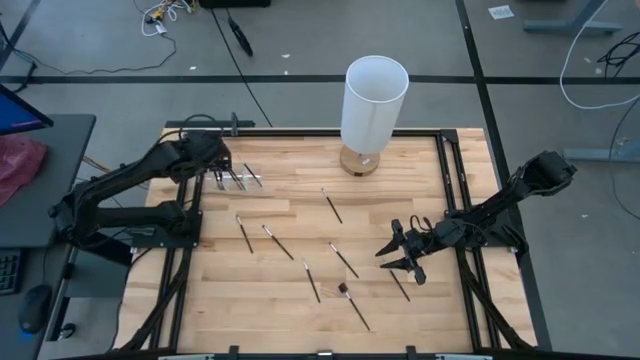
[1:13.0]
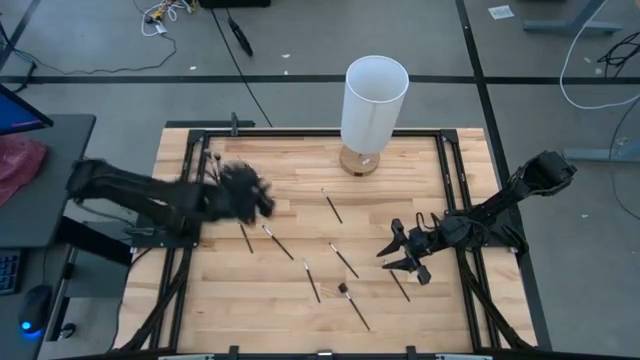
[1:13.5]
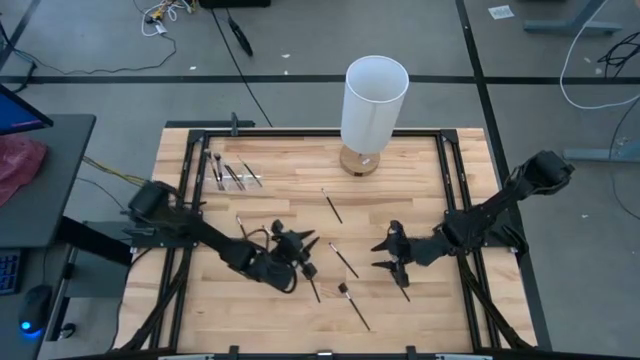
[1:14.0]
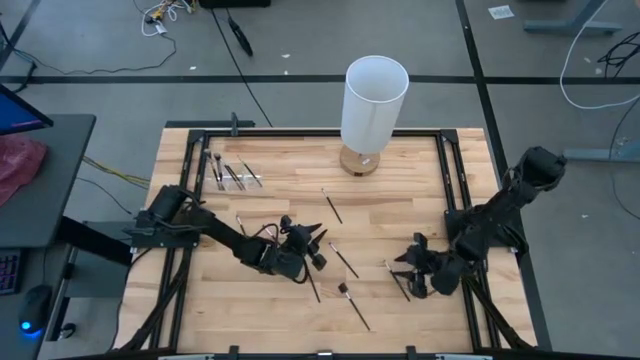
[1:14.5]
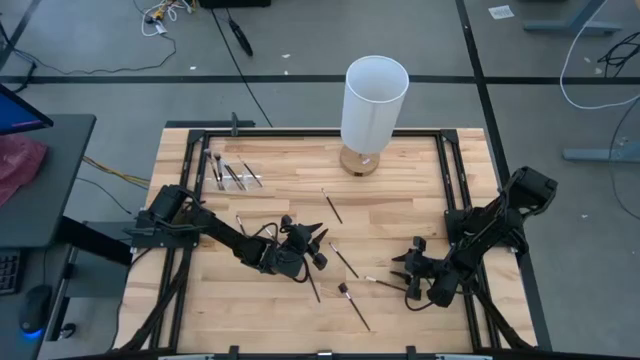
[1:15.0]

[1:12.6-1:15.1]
Task: Put items in baskets/containers
Put the black eyeshadow brush into the transparent organizer

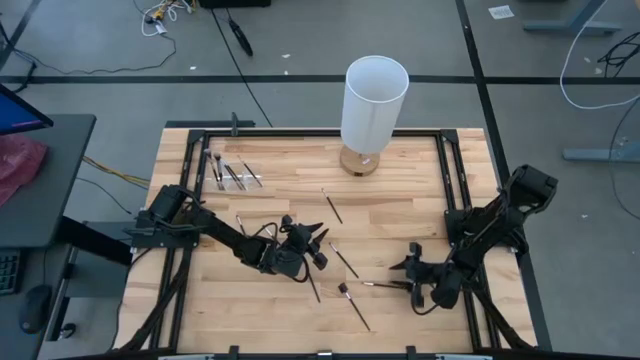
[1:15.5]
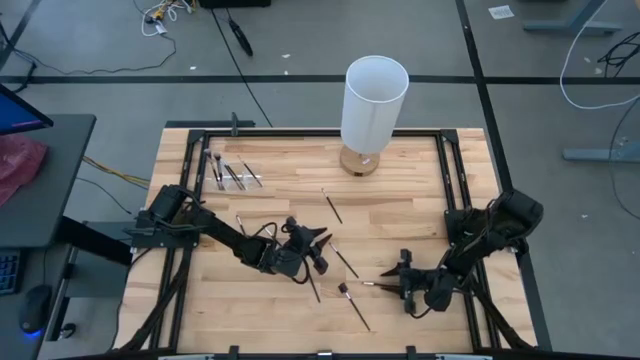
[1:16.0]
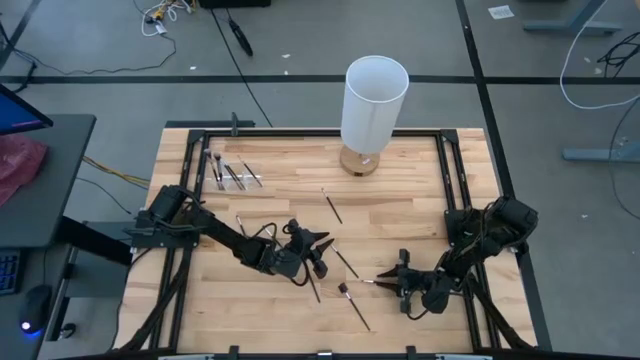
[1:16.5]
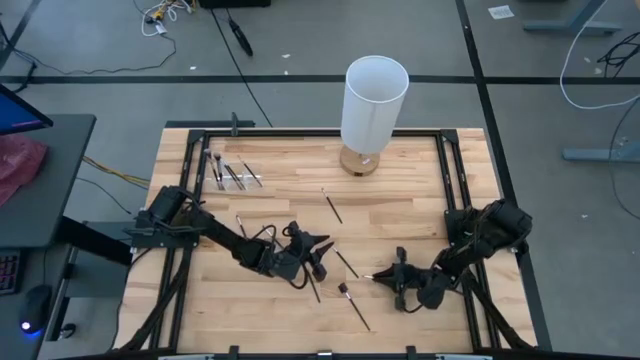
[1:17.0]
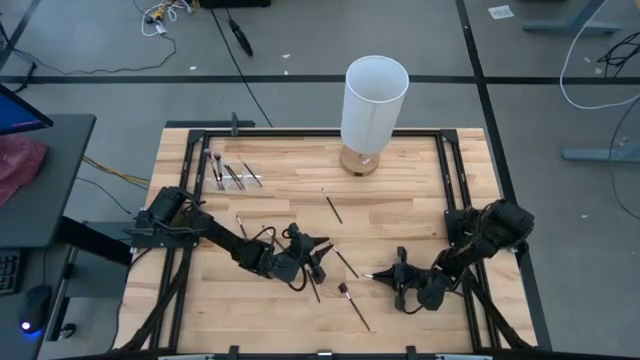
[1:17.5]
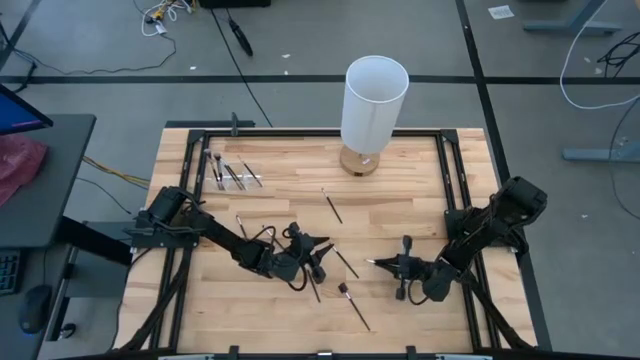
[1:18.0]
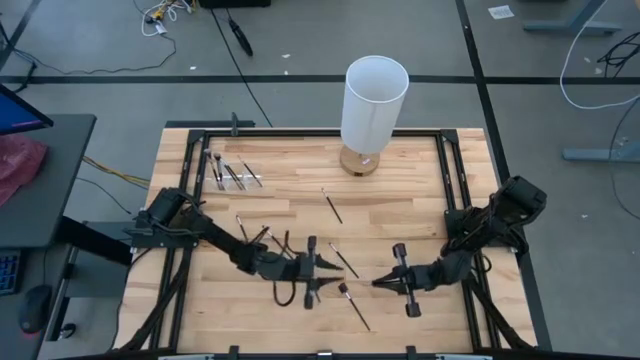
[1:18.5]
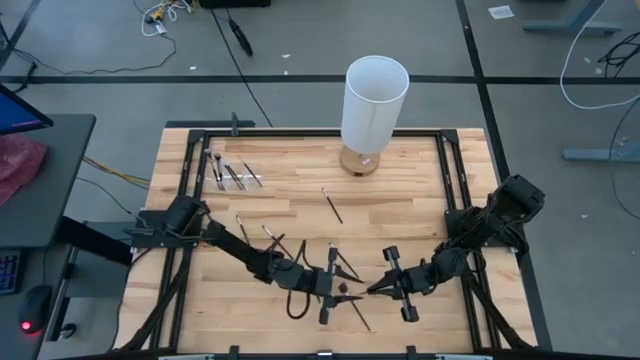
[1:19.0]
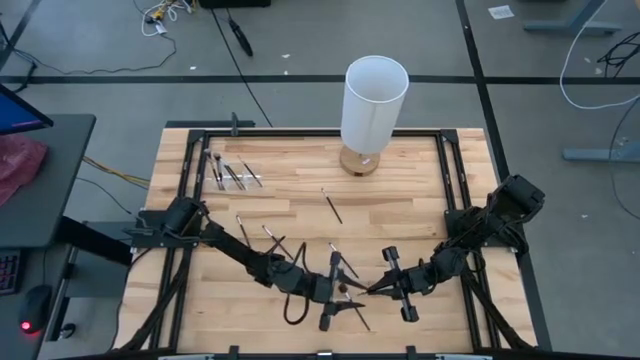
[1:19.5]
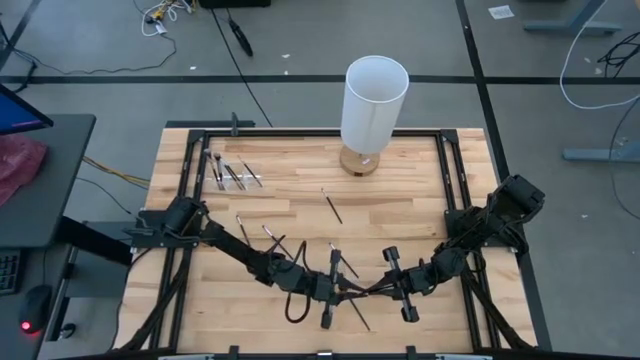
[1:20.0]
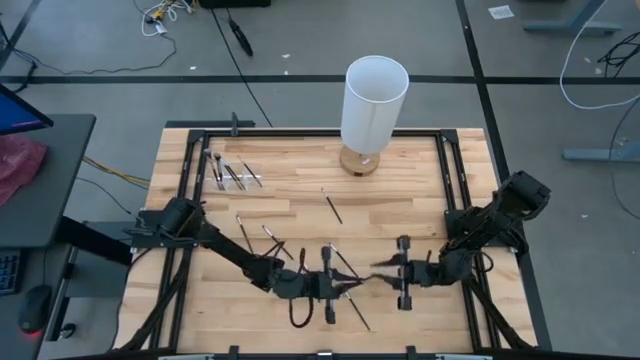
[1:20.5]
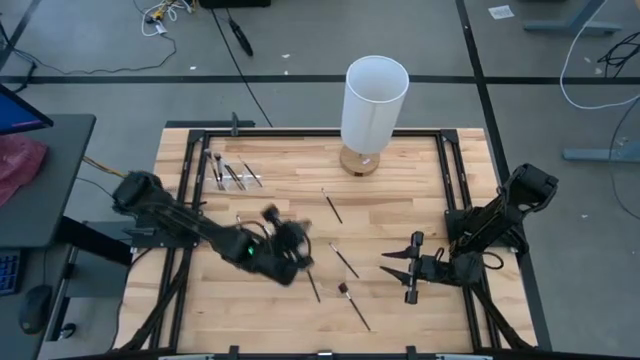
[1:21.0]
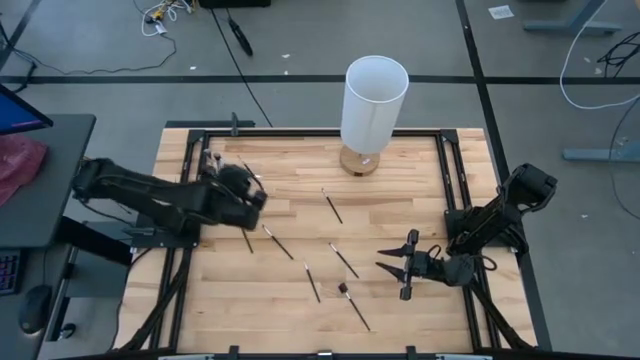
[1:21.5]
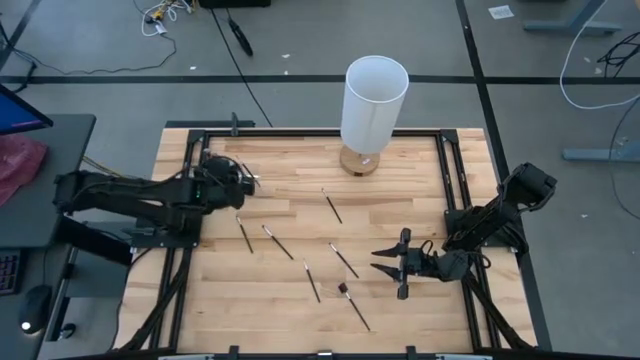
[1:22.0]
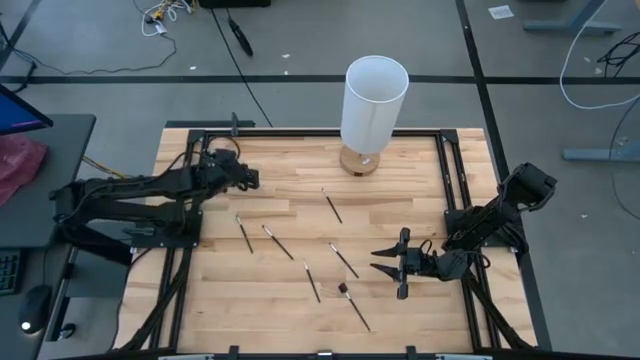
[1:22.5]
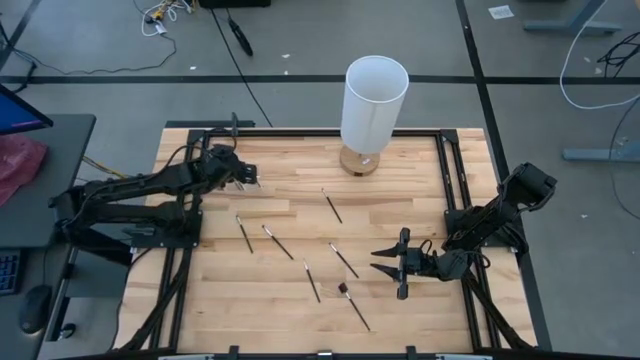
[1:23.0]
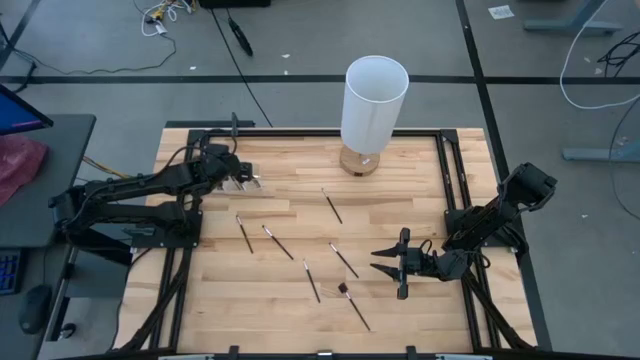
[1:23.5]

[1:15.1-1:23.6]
Put the black eyeshadow brush into the transparent organizer

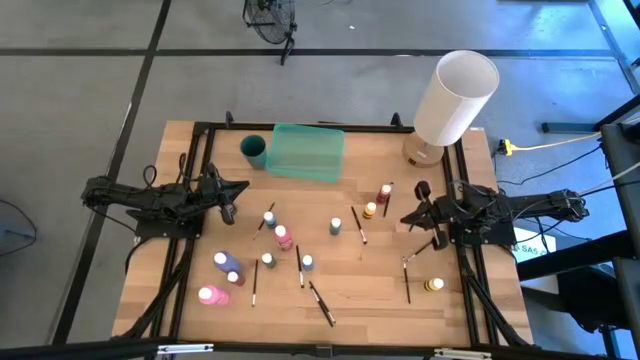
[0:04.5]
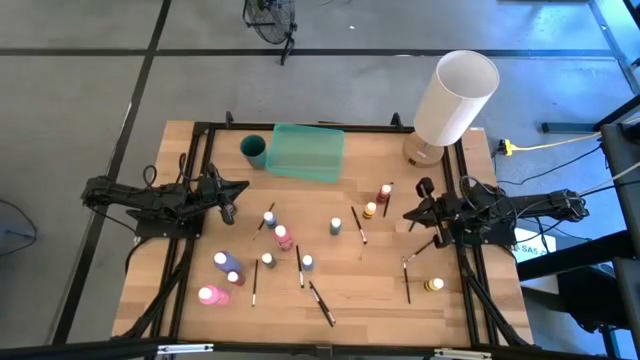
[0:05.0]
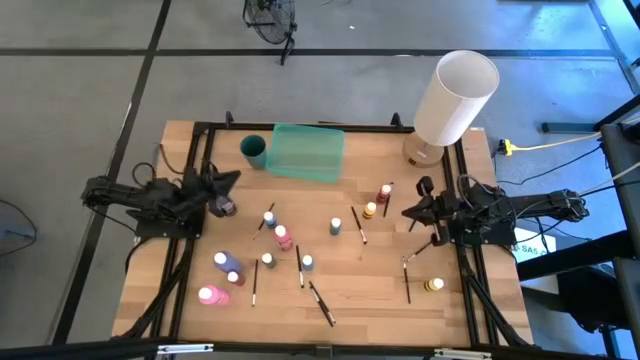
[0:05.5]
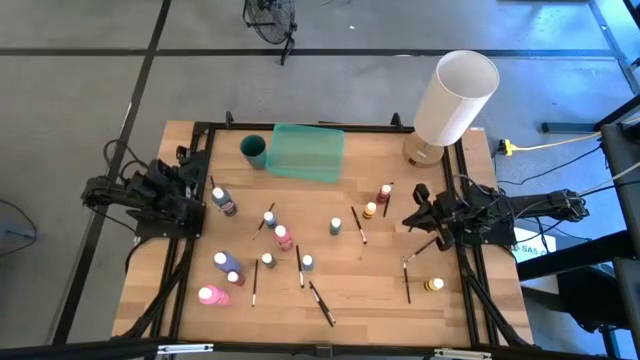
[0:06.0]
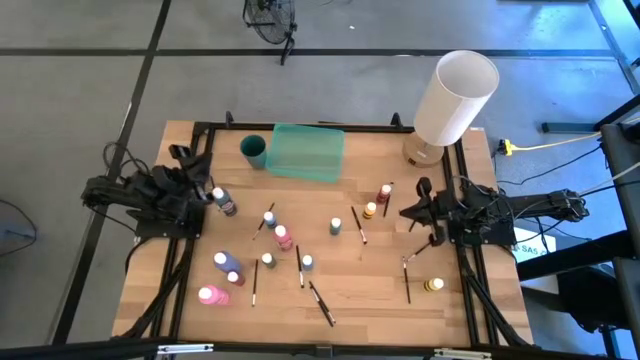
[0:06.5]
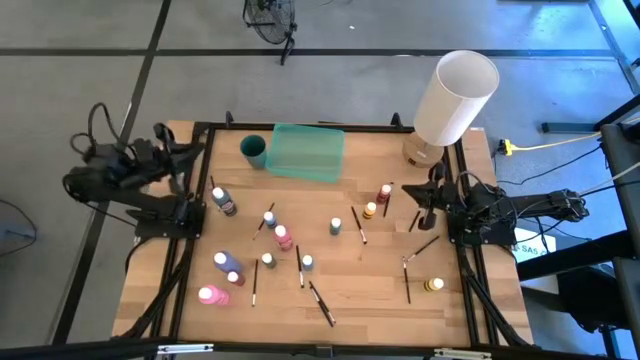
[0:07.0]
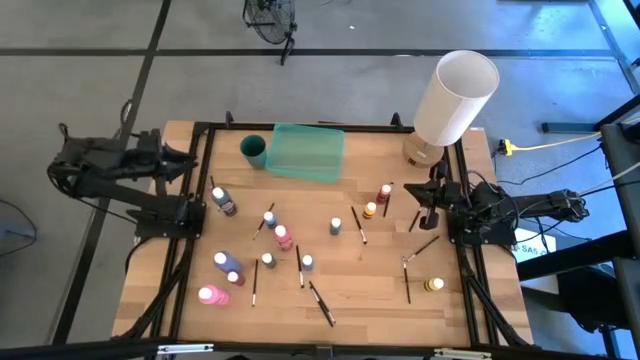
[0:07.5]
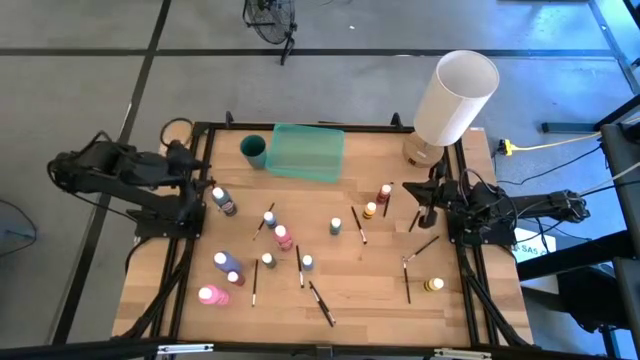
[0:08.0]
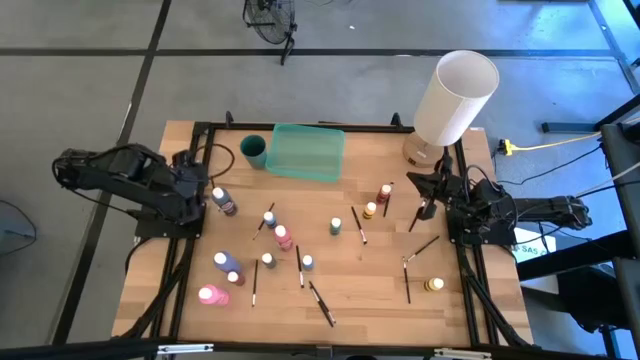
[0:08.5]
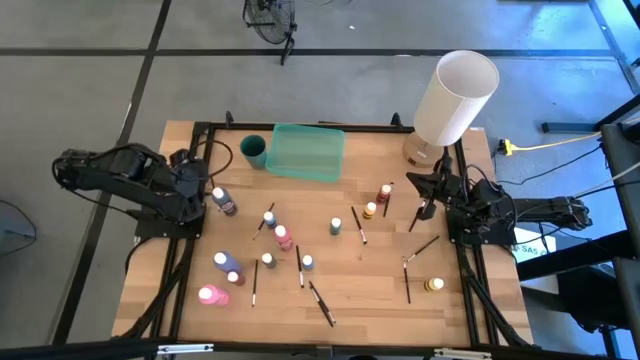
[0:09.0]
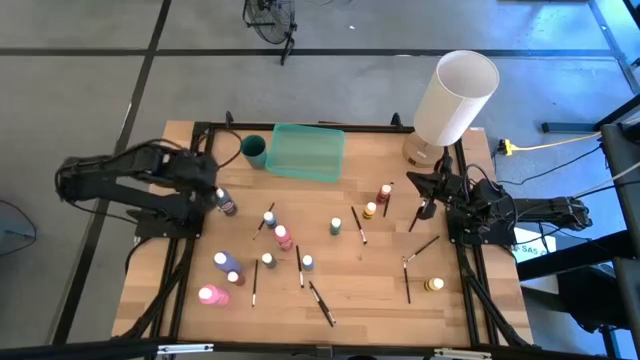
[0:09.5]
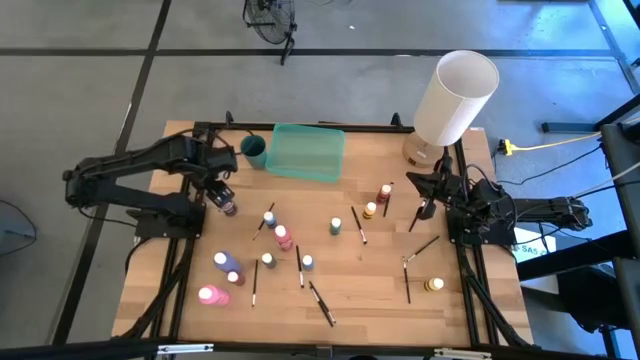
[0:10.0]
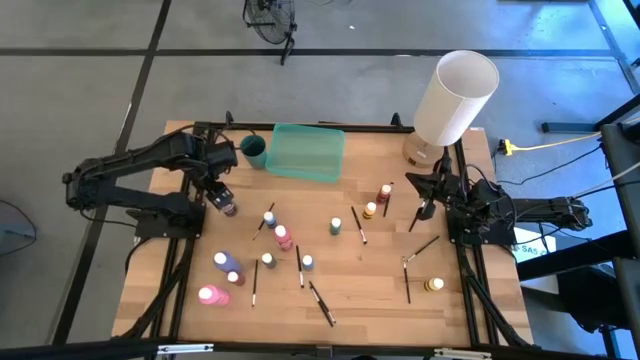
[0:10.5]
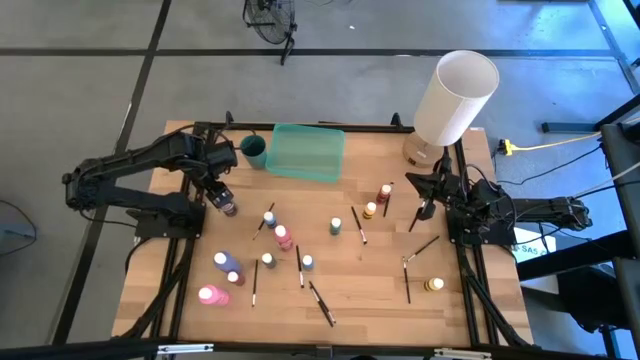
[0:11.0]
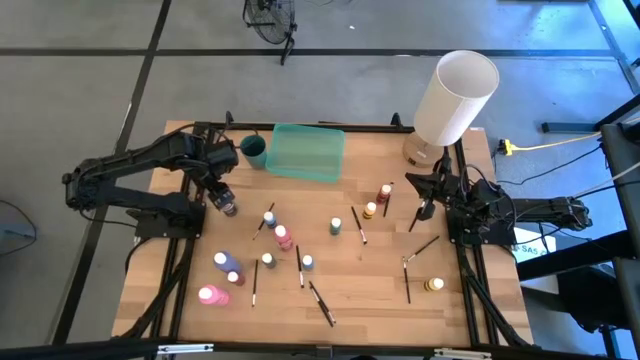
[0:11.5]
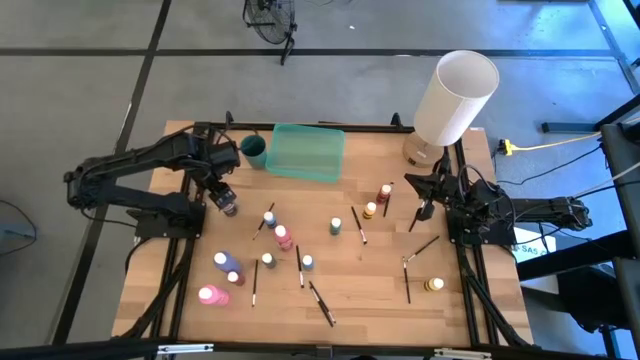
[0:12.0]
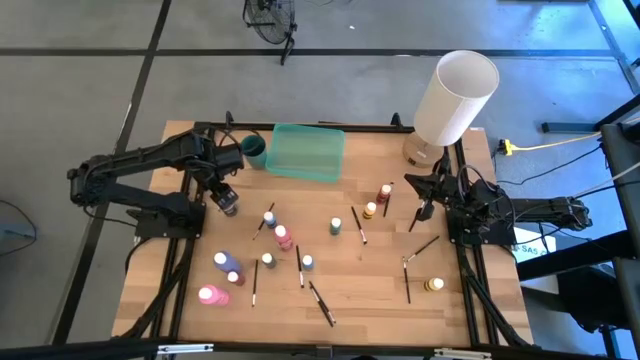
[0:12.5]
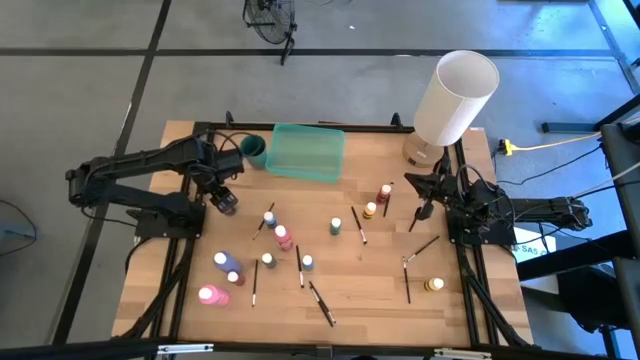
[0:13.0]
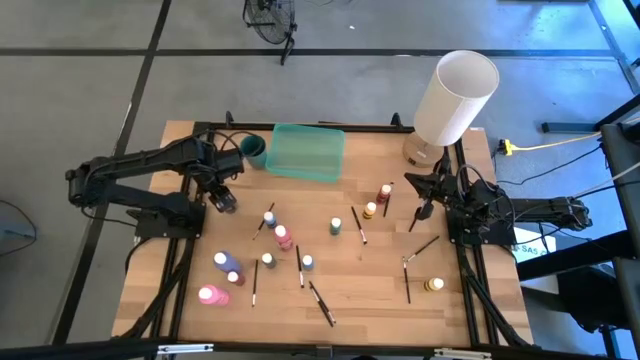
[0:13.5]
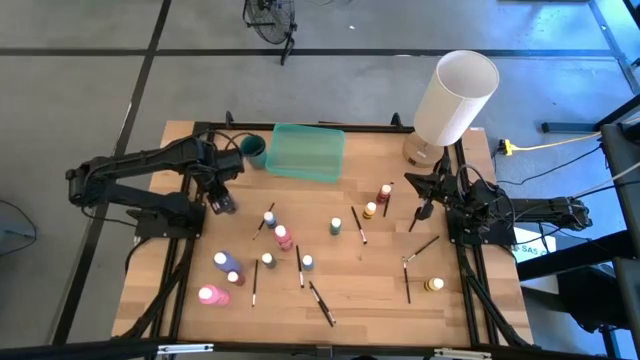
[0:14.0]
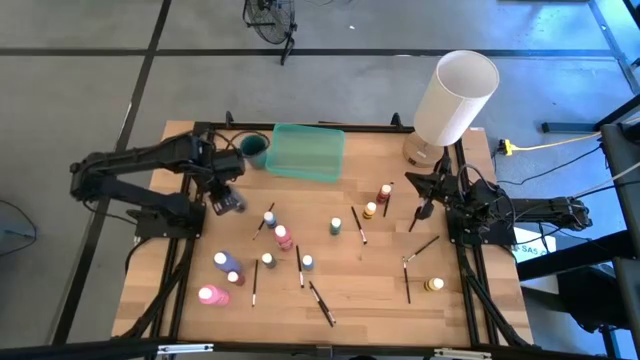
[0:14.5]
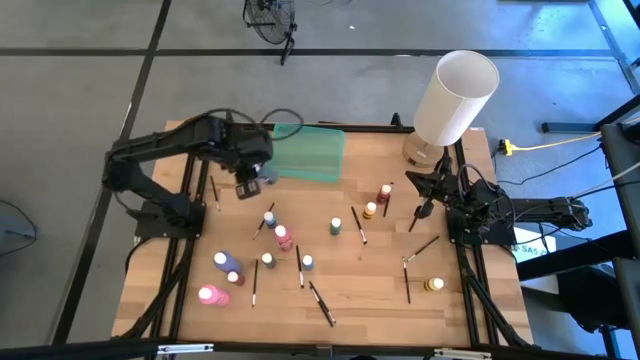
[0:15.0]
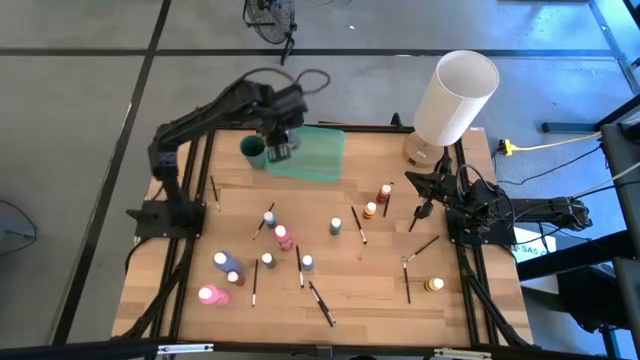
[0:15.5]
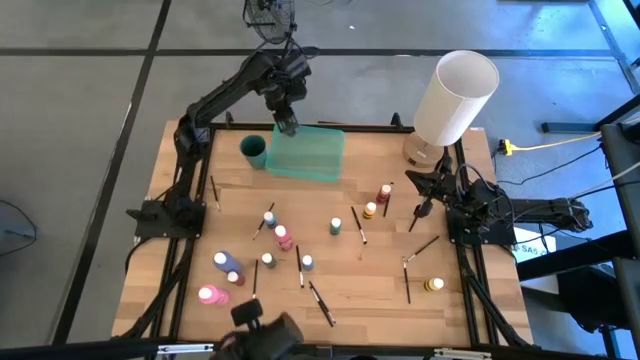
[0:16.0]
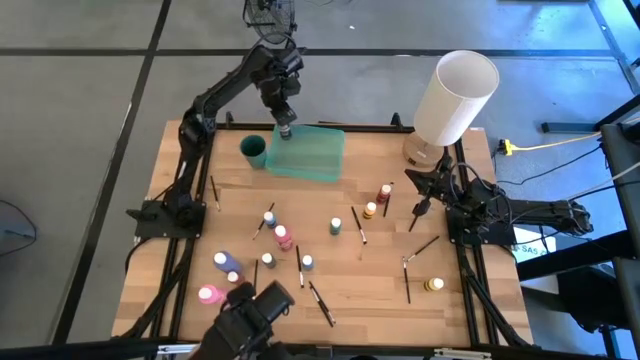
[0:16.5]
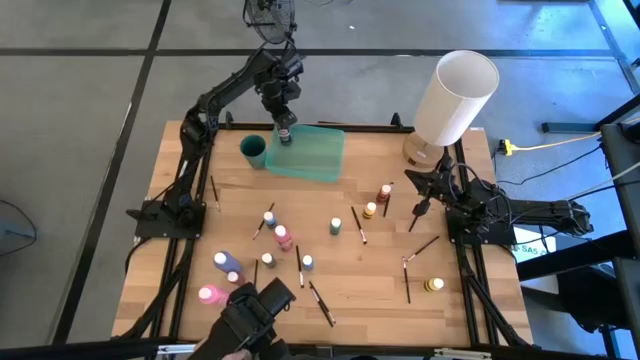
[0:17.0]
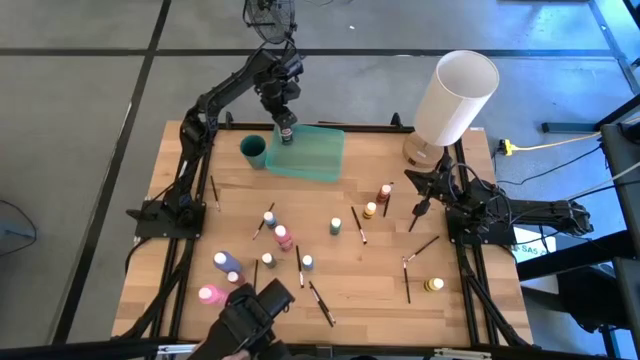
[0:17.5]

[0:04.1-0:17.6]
Task: Pick & Place Paint Supplies
Put the big black paint bottle into the green bin
